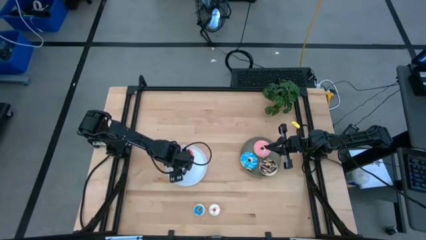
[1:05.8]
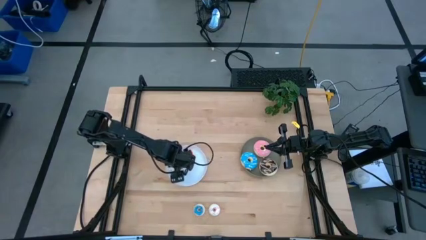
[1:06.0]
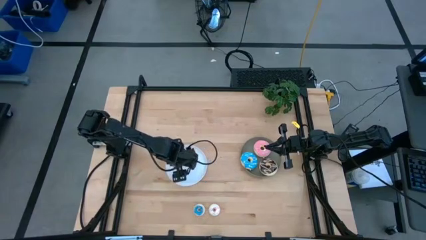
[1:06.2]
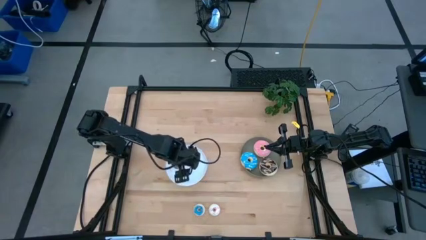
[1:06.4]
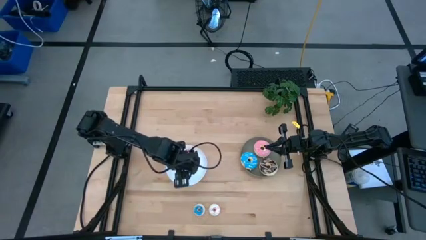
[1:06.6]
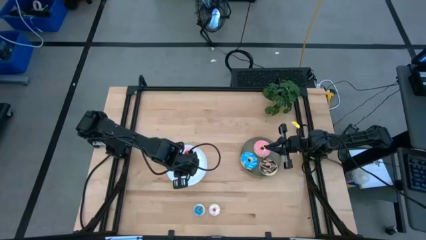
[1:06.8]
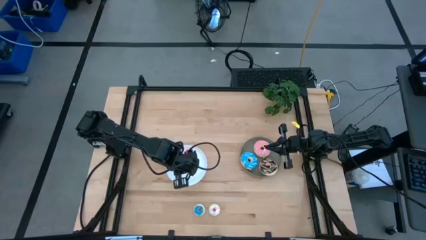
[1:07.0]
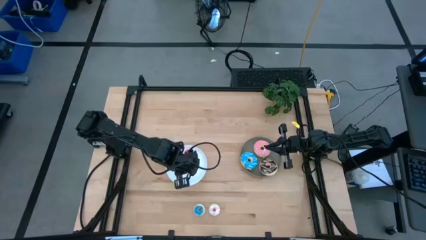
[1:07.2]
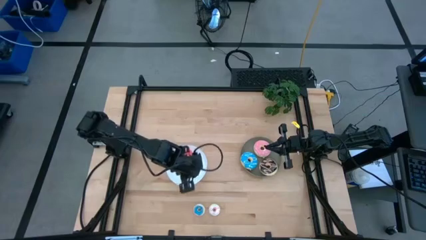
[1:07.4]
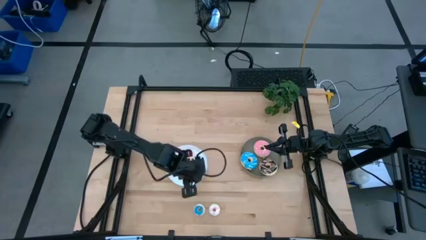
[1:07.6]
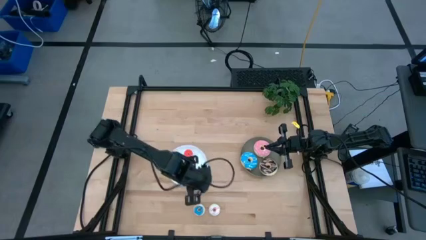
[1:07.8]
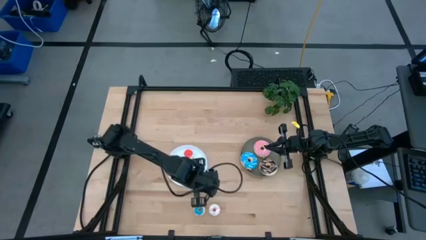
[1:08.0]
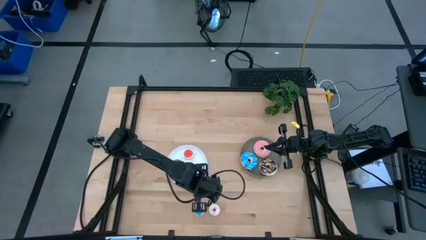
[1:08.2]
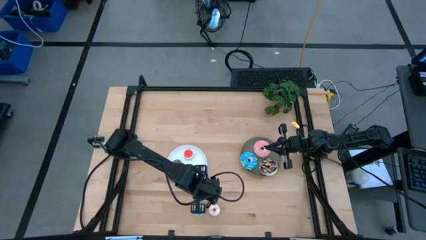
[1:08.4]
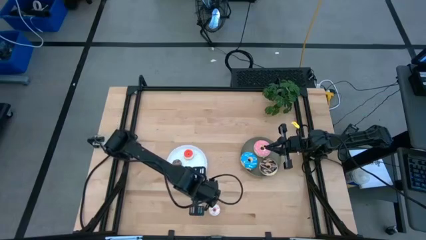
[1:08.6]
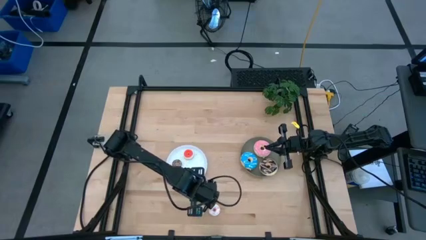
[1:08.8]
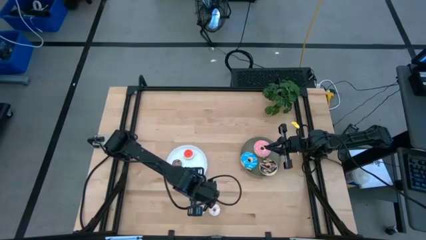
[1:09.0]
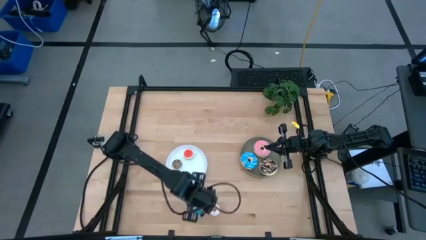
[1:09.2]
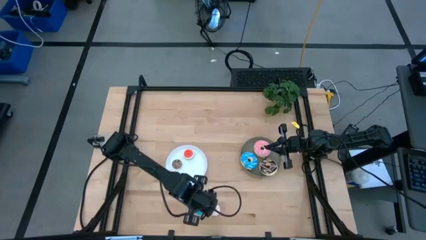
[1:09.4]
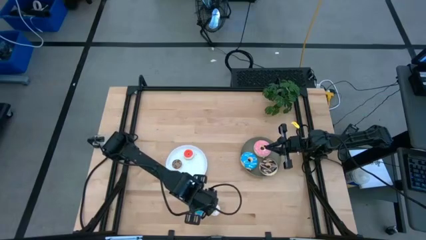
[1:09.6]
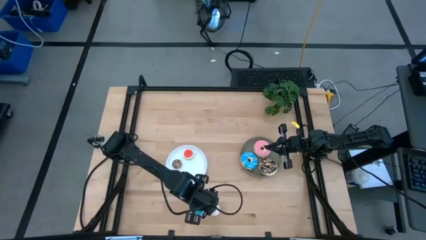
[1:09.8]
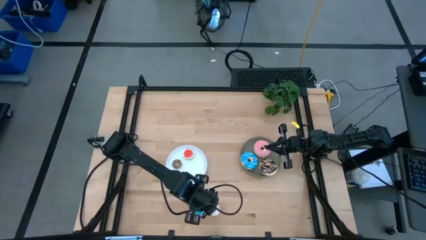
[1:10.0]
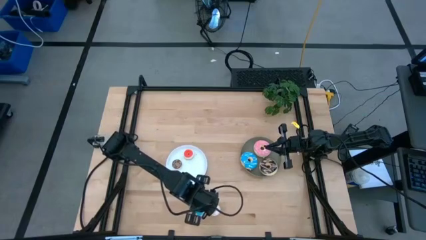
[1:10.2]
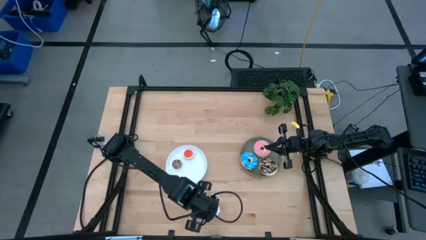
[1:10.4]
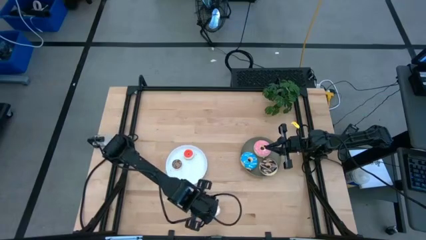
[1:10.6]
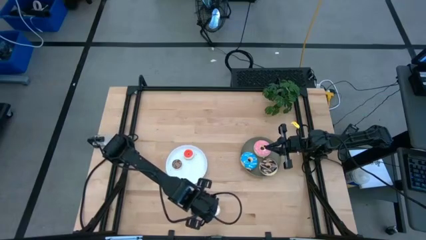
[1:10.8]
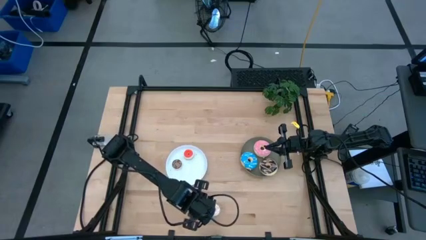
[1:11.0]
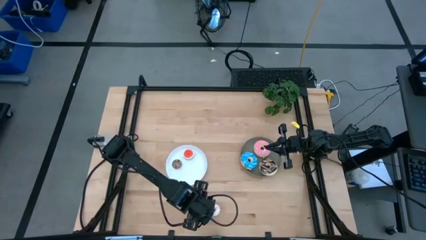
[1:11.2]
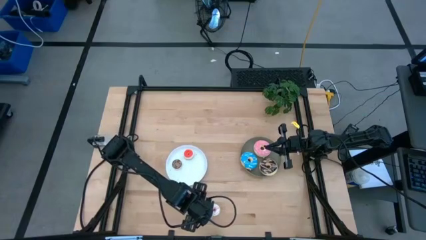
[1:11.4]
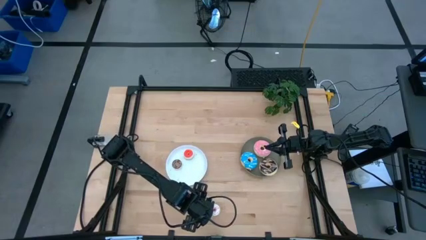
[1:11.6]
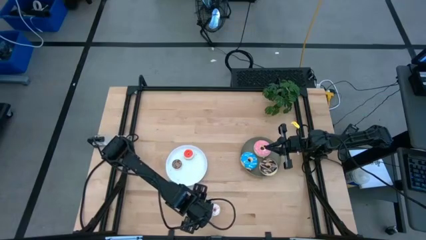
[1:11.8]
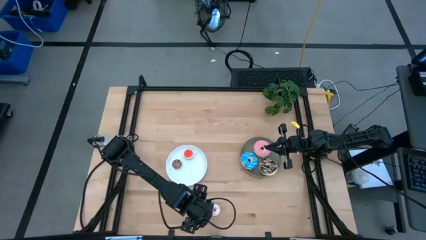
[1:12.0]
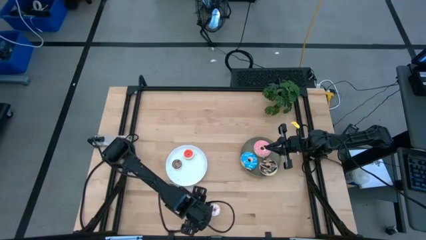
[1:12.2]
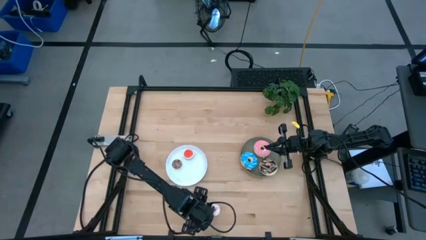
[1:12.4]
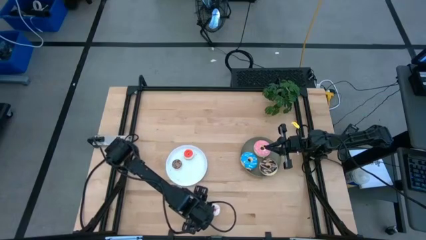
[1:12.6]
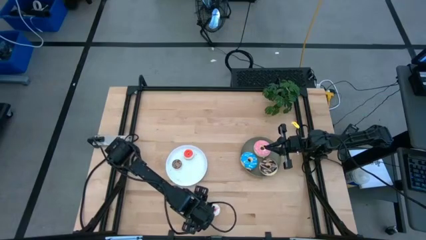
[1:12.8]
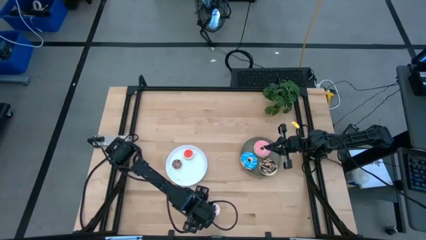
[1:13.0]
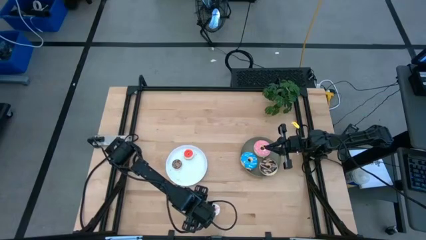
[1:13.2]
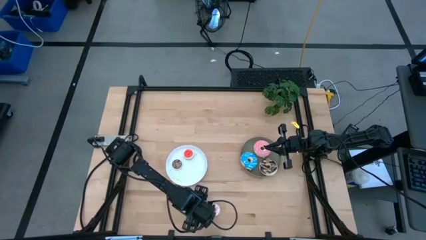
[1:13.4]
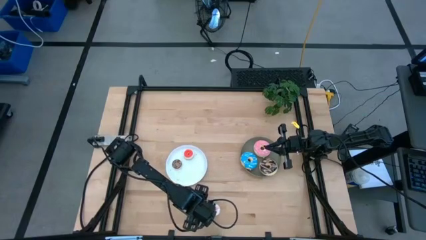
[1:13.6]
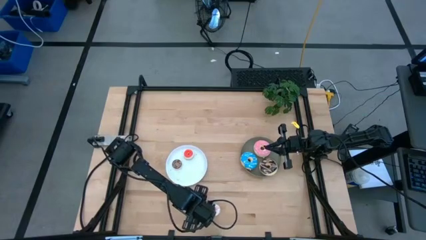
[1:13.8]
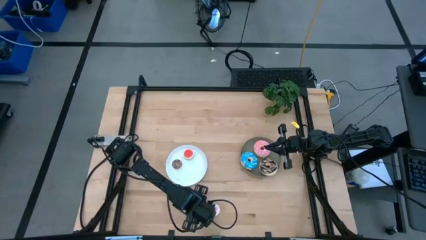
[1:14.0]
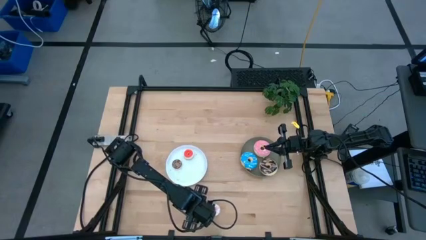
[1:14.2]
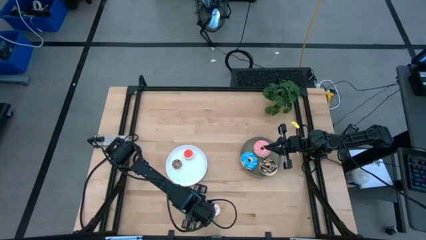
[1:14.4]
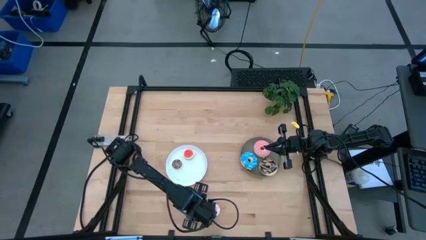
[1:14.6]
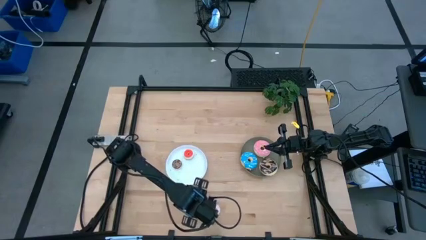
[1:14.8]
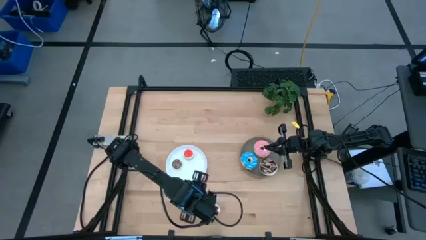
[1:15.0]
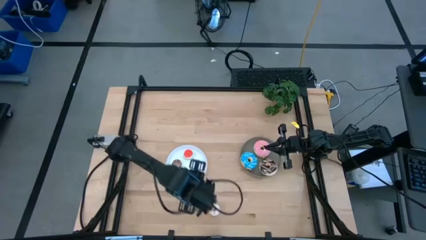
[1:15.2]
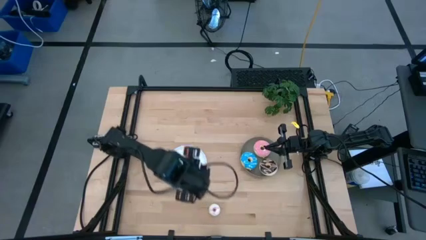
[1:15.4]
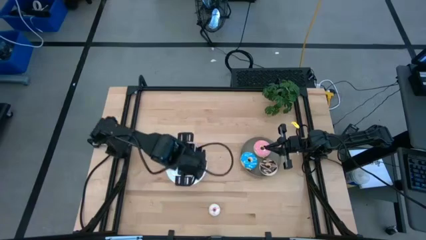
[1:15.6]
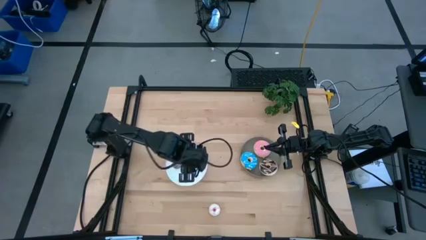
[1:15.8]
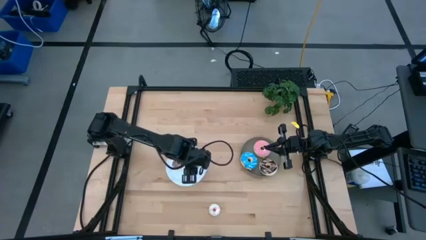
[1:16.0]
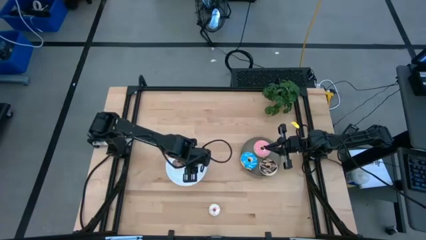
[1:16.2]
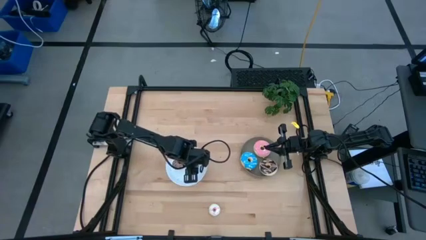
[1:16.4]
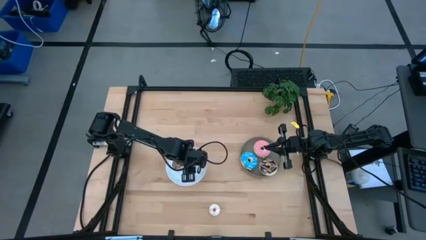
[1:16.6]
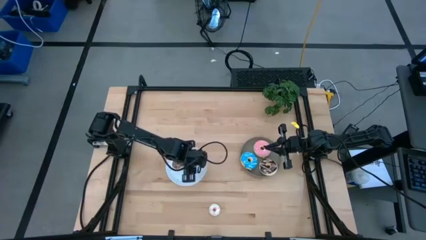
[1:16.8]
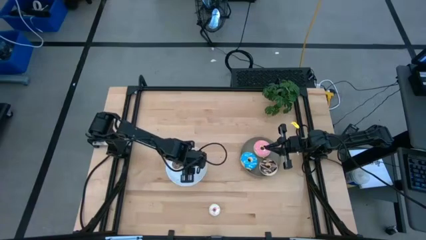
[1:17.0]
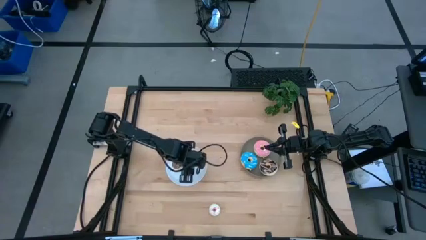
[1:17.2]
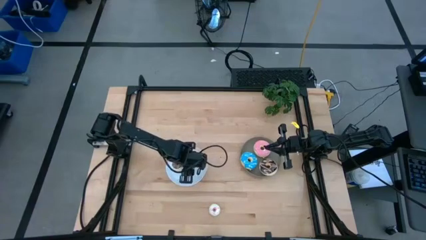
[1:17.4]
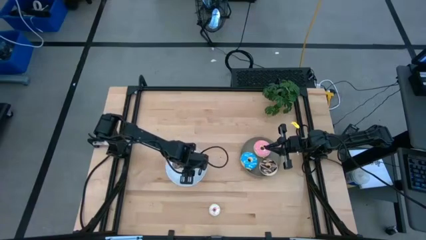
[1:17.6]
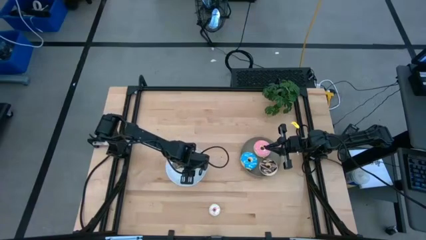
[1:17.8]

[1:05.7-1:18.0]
Task: Pick & Place donuts
Put the small blue donut on the white plate

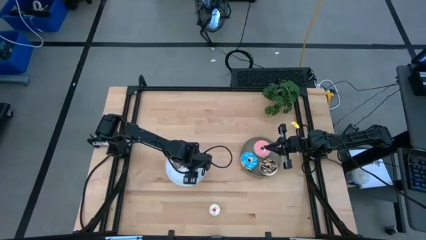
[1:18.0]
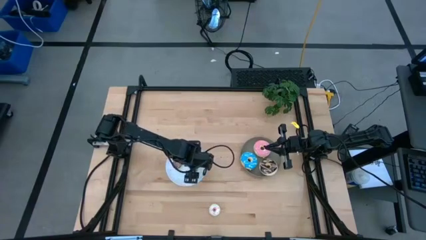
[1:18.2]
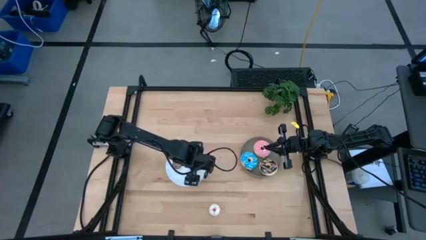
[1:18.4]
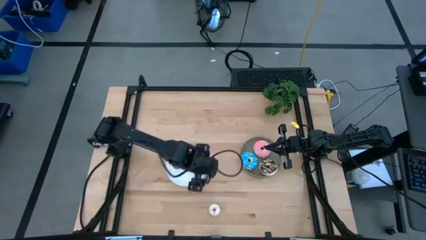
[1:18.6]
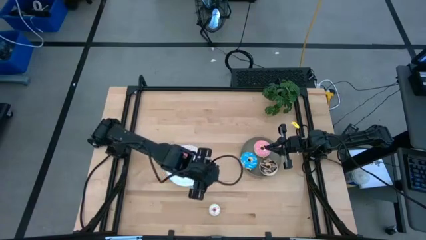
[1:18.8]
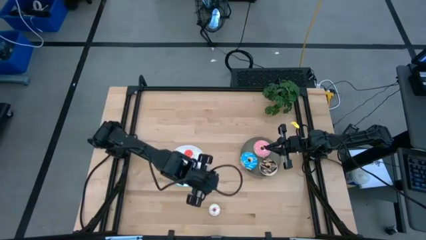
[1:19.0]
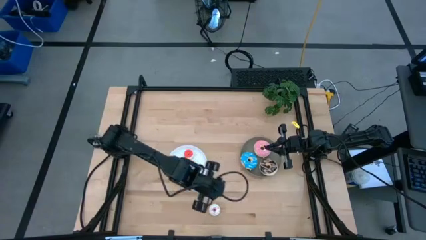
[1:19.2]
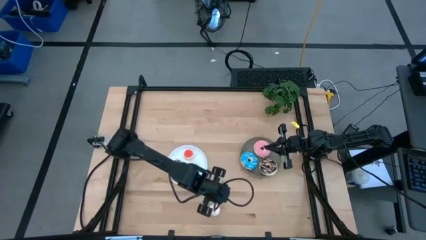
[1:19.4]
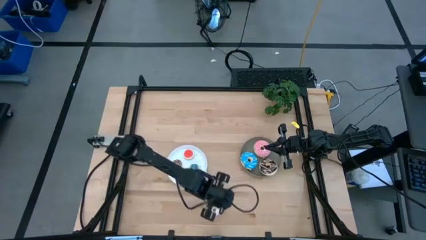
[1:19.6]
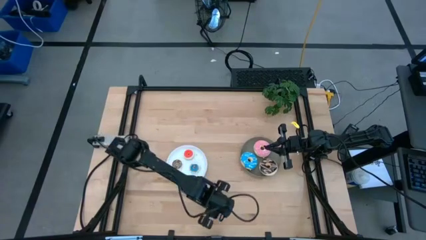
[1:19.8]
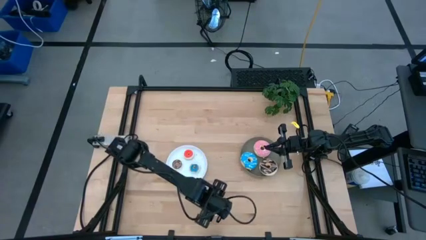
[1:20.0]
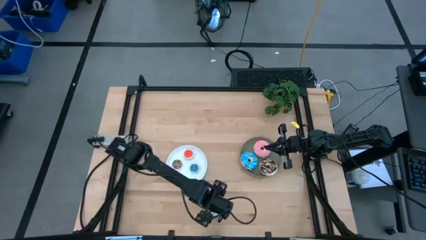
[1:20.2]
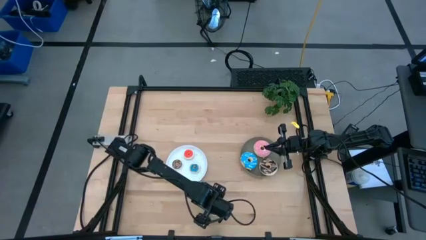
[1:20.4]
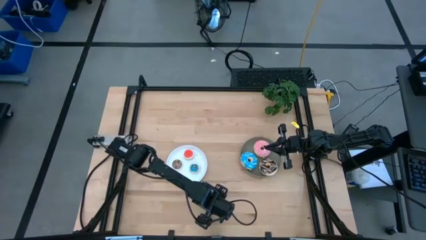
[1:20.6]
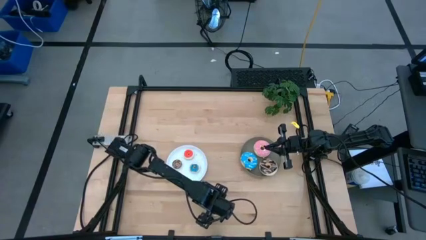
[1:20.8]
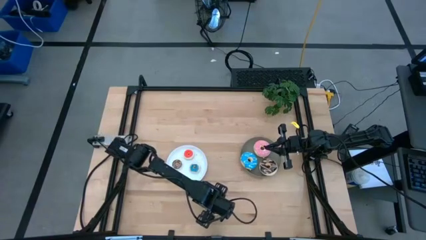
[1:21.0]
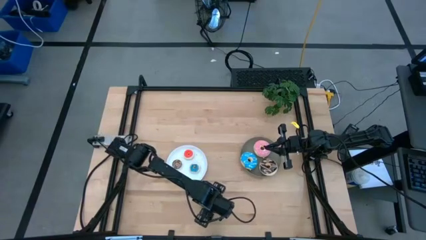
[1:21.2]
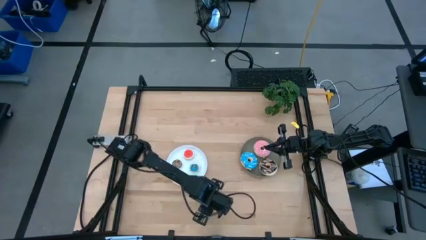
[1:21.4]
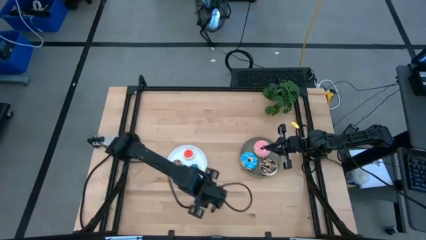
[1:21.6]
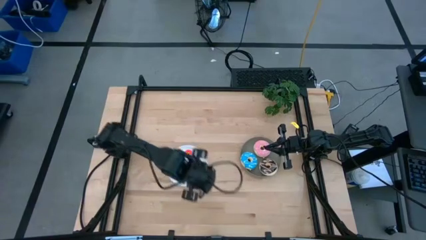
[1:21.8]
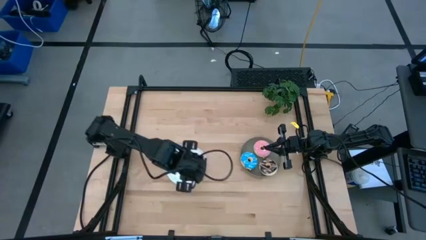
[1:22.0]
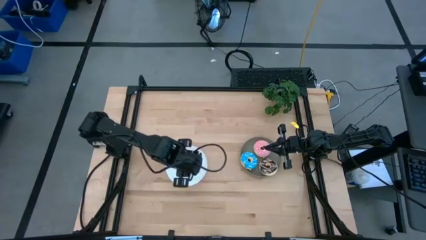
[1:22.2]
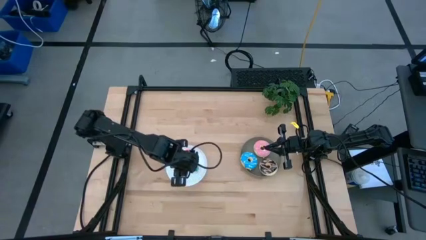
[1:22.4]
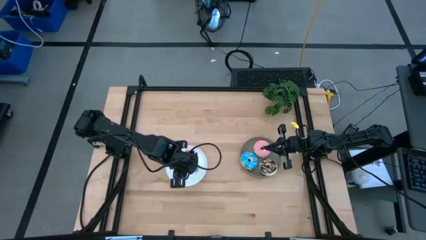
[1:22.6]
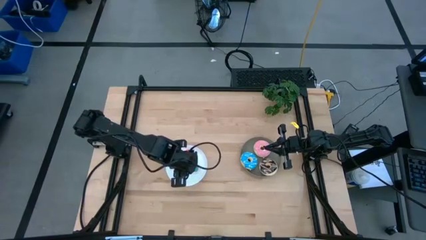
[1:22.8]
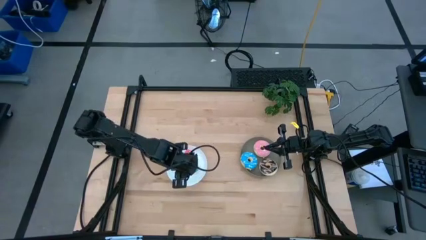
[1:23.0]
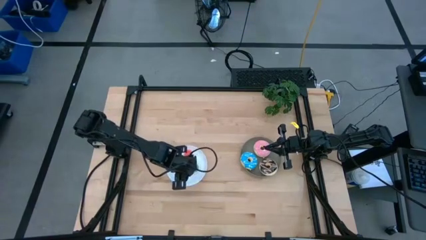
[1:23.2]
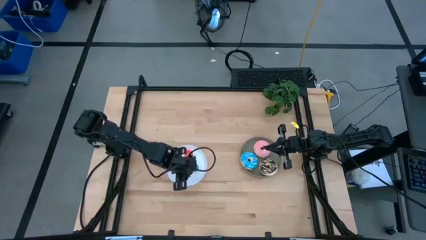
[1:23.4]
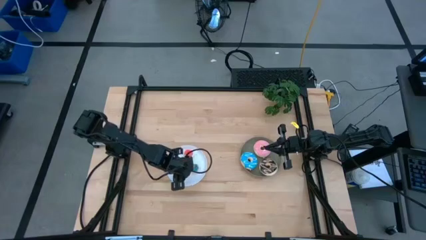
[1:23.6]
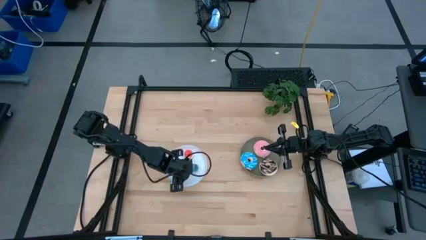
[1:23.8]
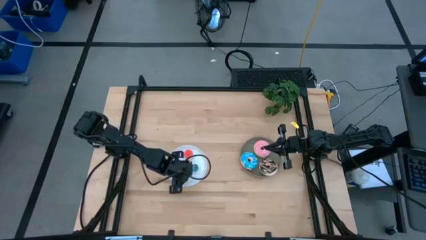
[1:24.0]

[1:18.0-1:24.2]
Put the small white donut on the white plate
